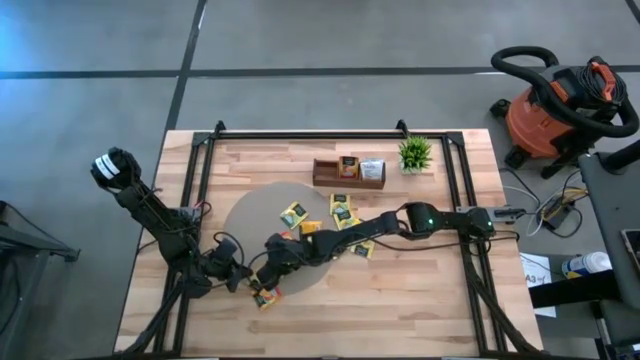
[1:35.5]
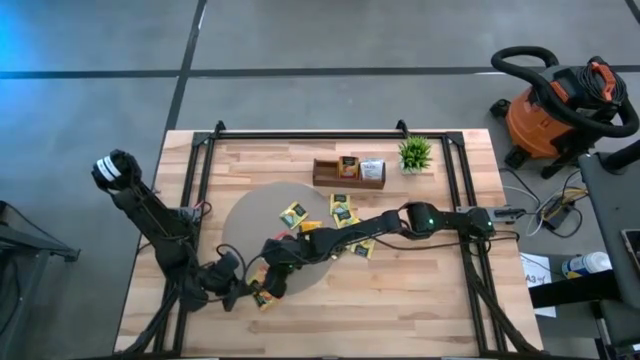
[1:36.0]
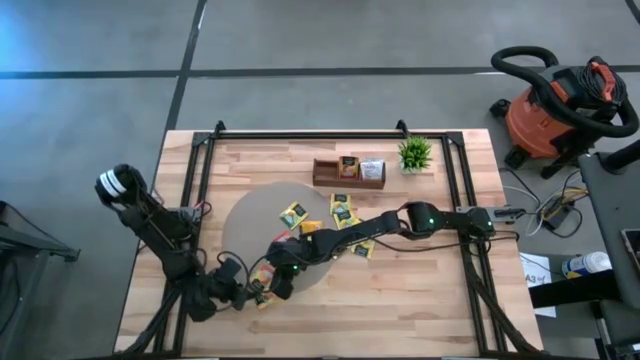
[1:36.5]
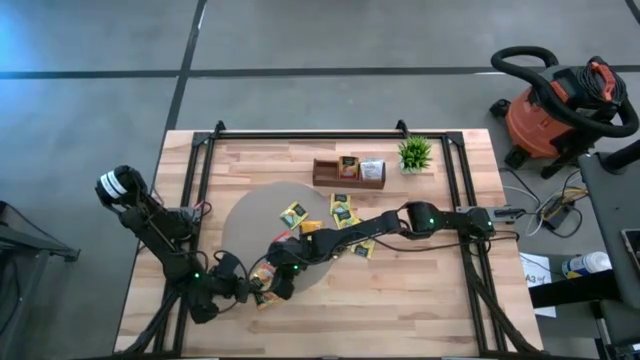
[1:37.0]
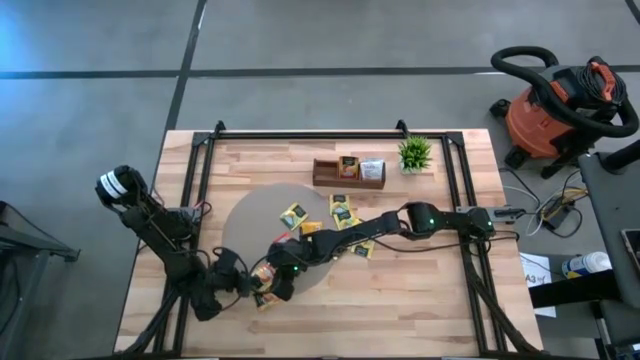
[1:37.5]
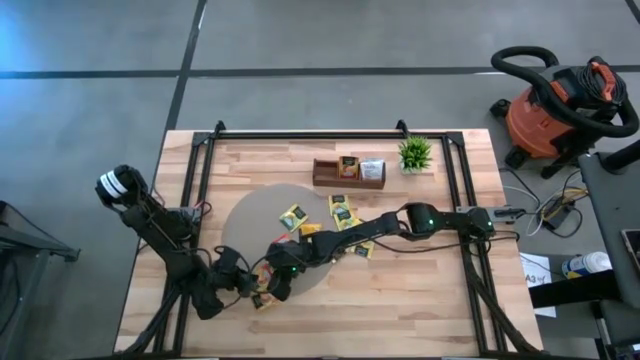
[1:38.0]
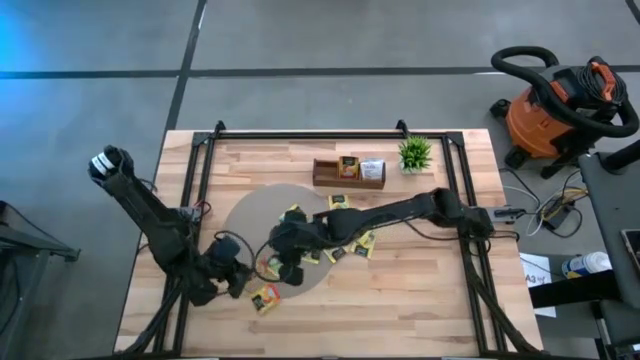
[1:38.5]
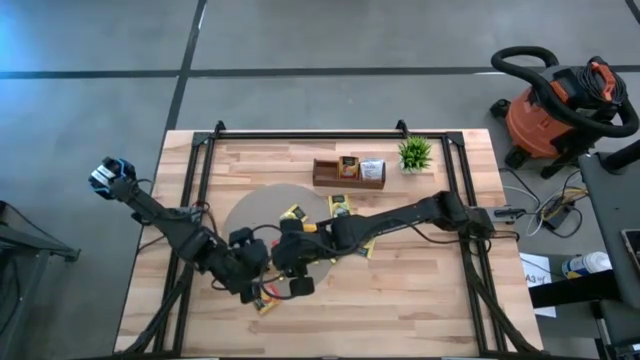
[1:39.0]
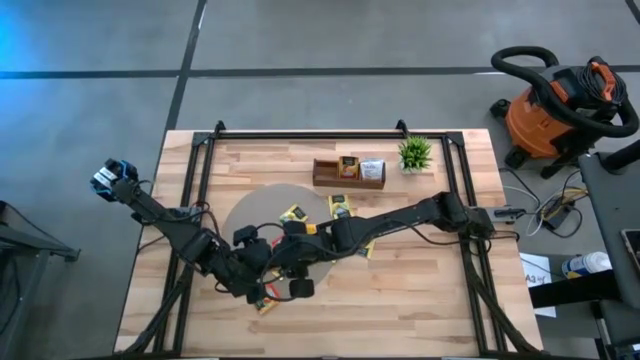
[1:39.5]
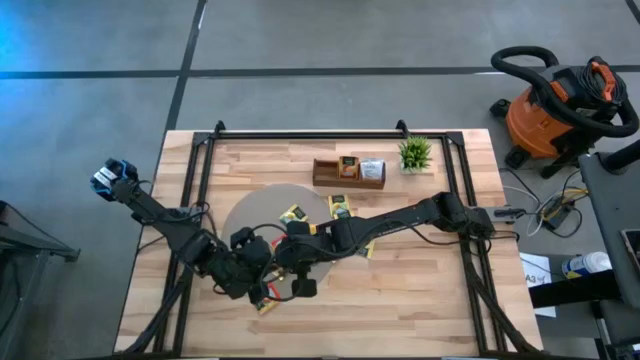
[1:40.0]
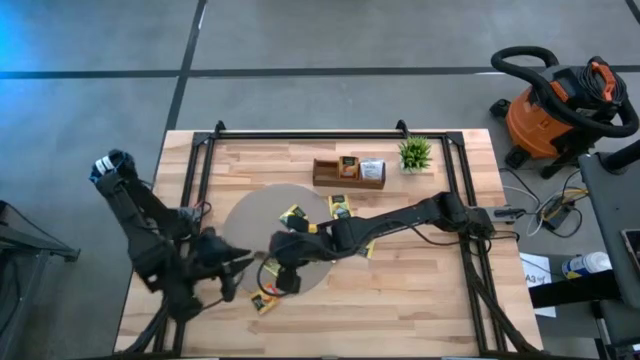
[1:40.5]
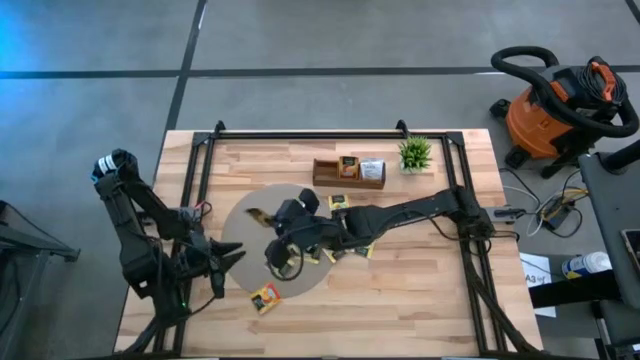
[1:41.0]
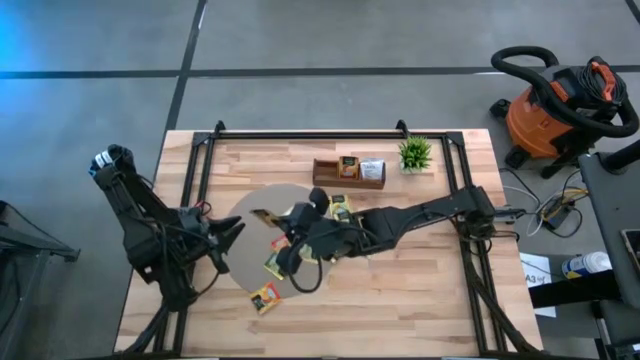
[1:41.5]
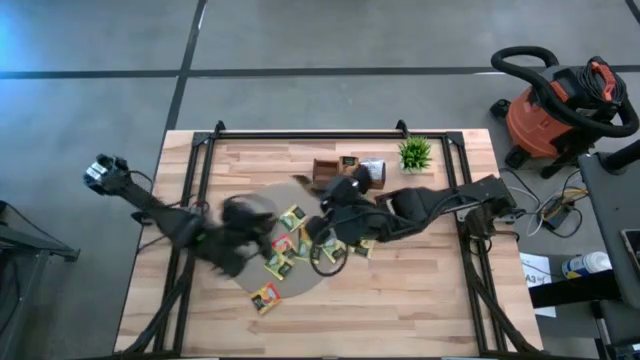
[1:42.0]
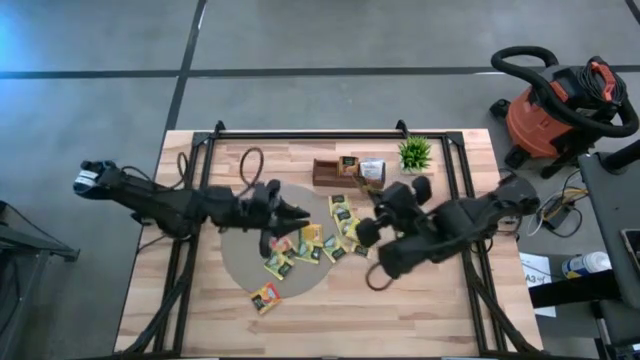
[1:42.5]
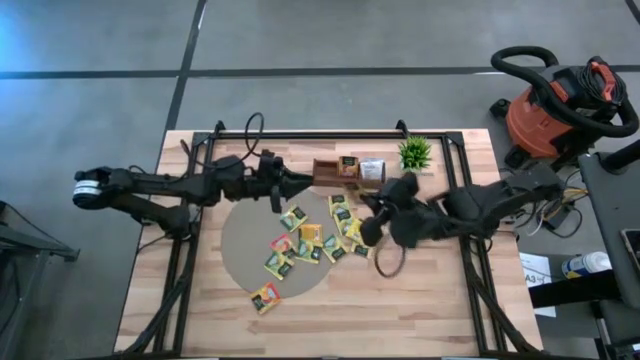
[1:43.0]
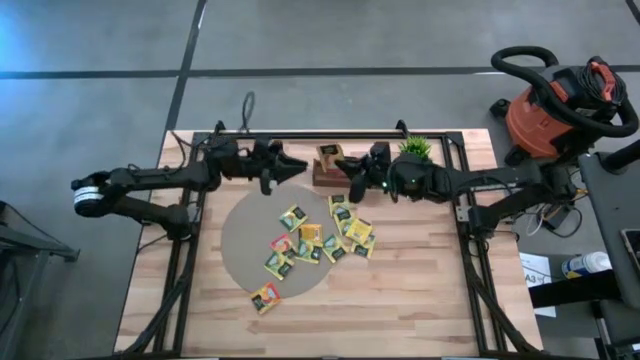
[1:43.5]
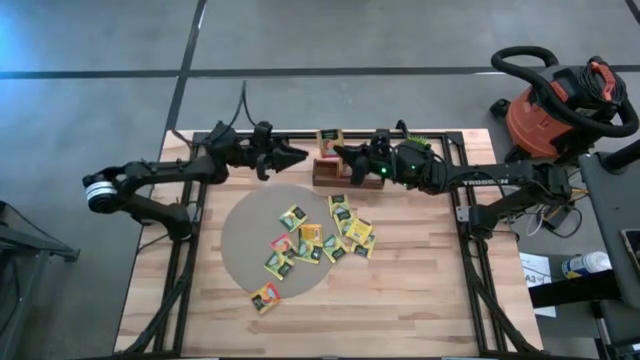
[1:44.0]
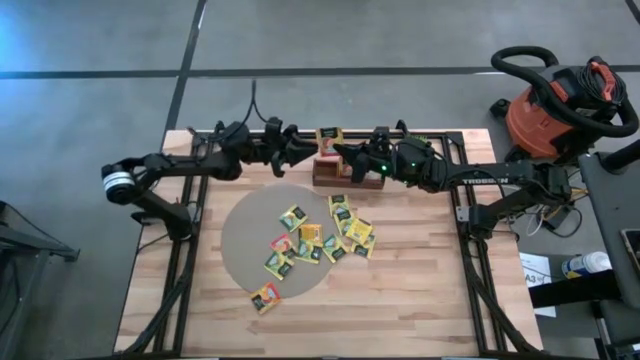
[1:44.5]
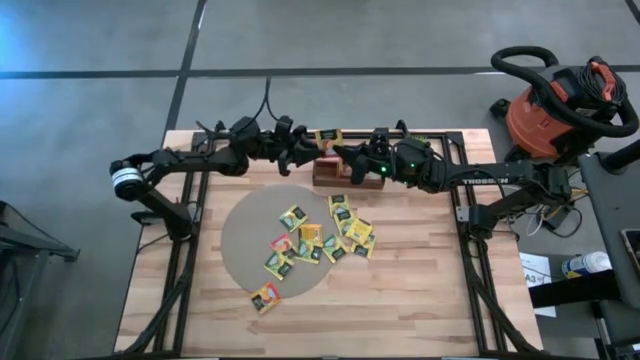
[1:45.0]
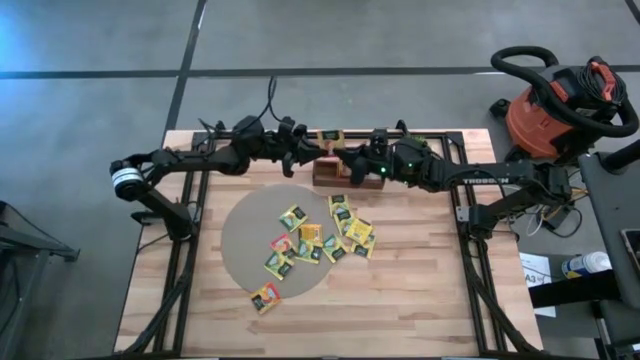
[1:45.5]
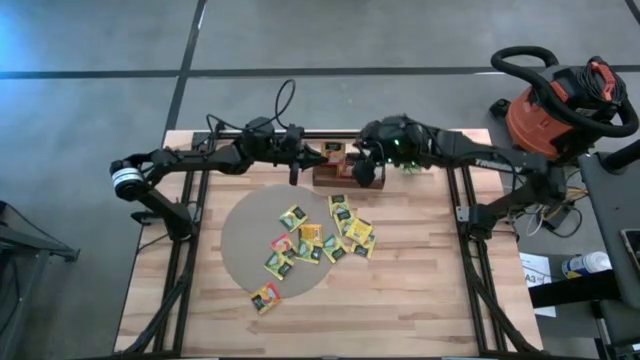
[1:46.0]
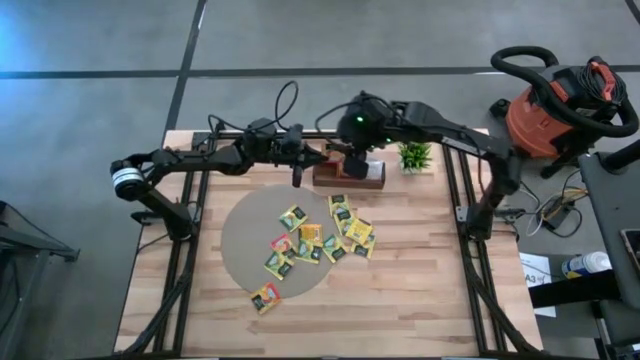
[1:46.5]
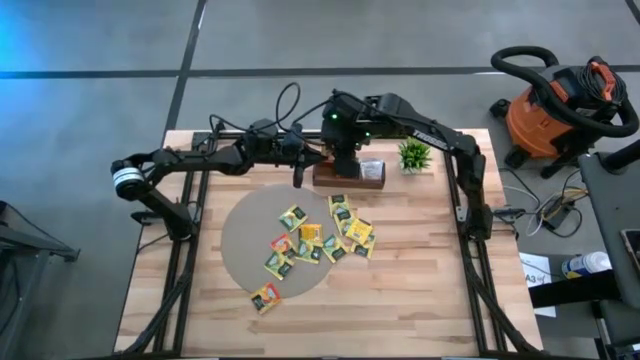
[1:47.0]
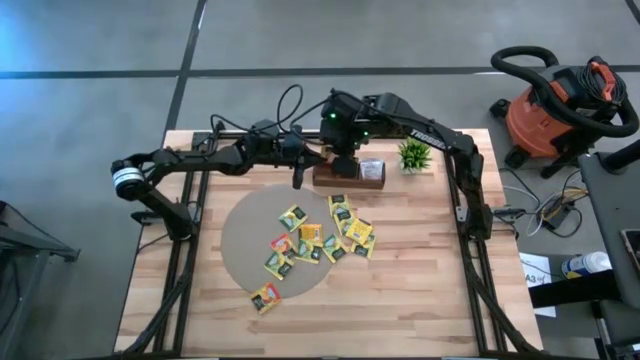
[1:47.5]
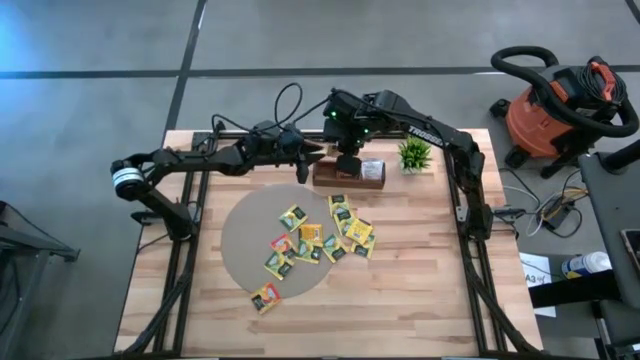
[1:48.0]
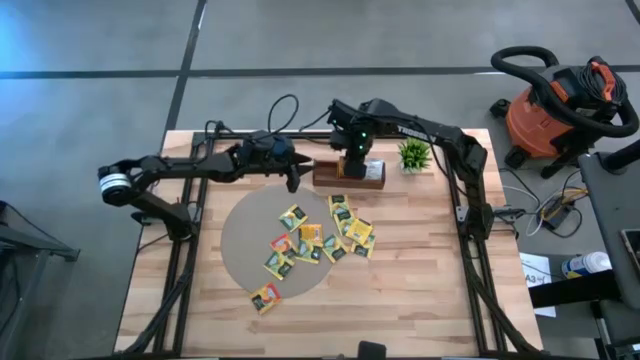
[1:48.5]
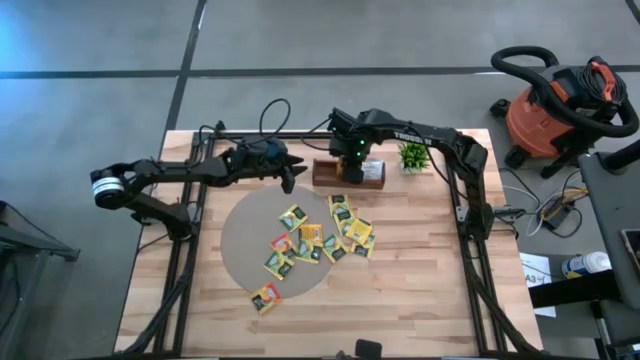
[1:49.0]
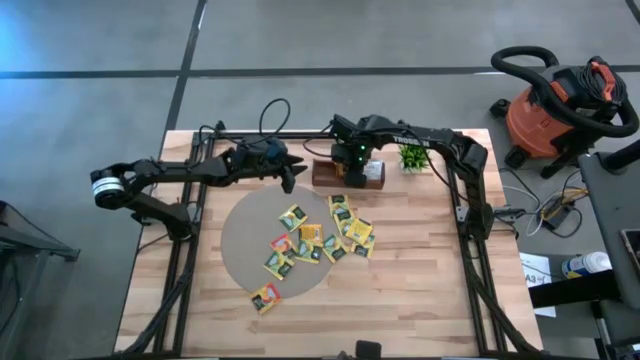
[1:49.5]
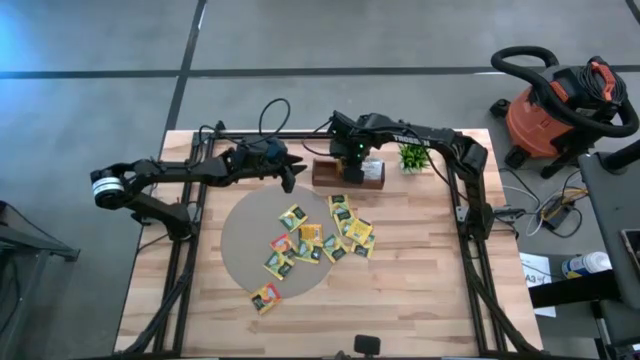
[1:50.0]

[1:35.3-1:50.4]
Task: Pick & Place Tea
Put the red tea sachet into the middle compartment of the wooden organizer

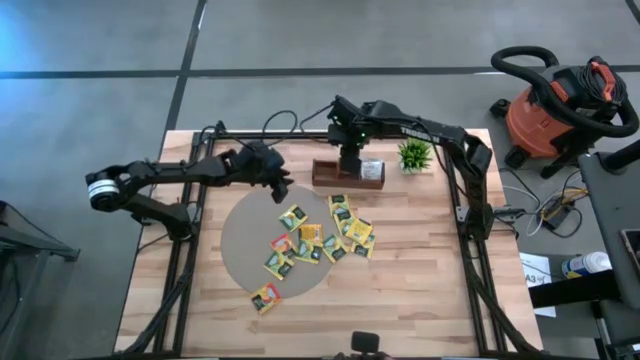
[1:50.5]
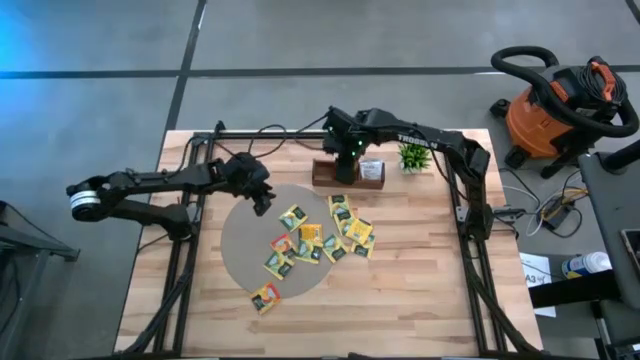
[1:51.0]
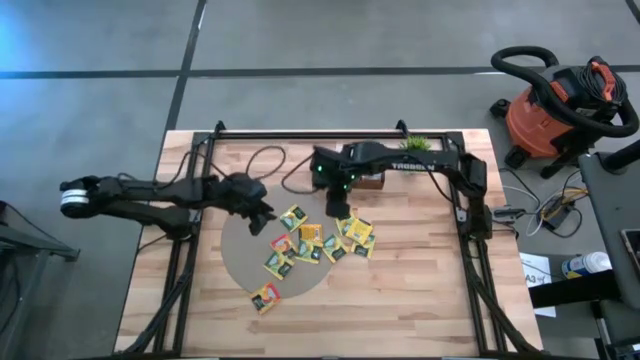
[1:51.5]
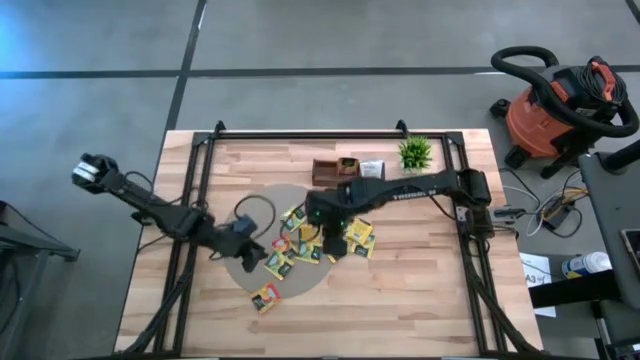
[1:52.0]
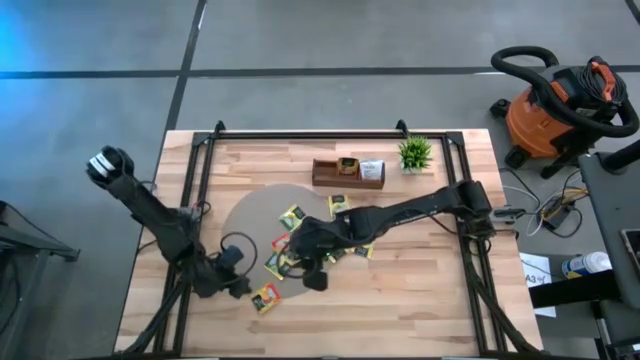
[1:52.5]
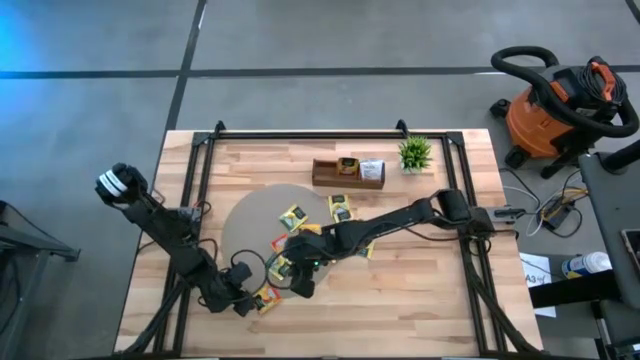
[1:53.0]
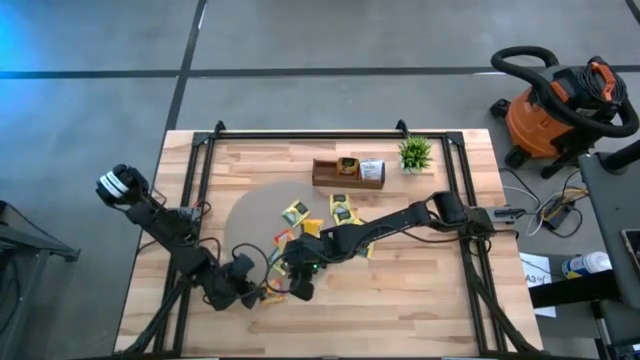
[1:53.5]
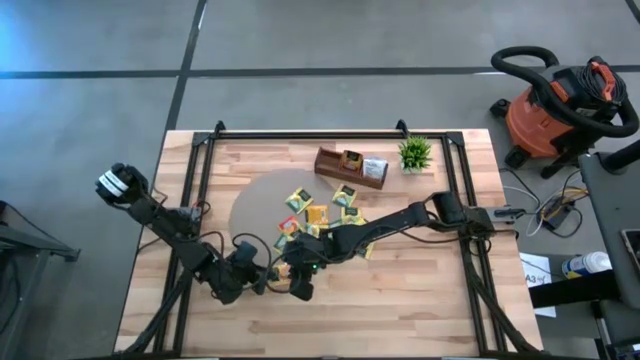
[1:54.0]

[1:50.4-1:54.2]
Put the red tea sachet into the middle compartment of the wooden organizer

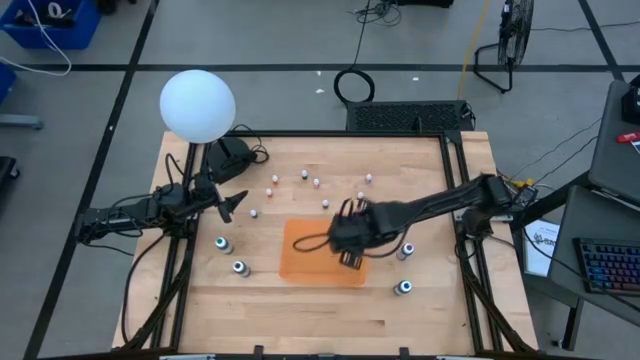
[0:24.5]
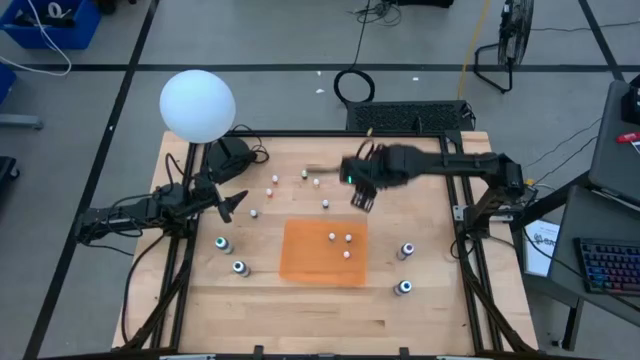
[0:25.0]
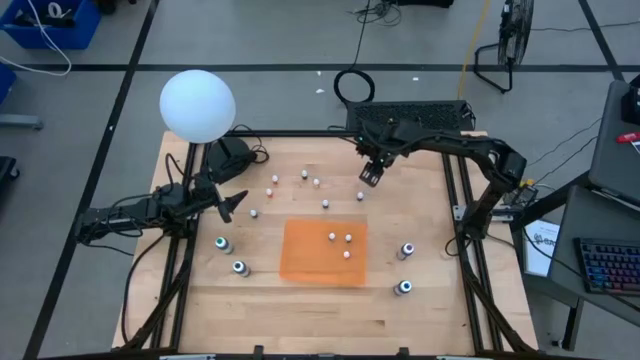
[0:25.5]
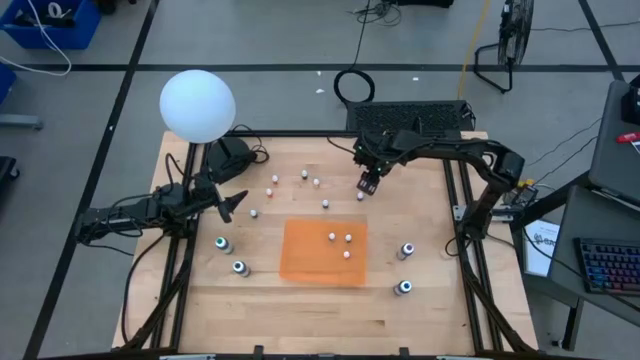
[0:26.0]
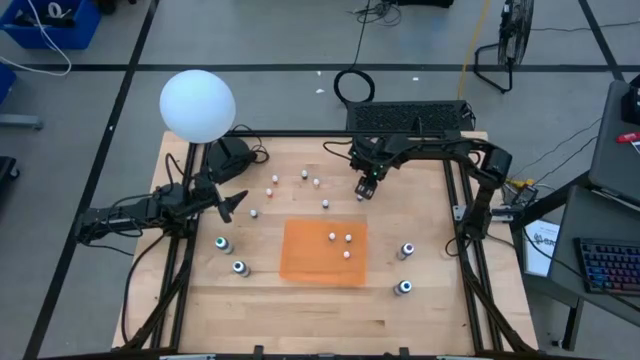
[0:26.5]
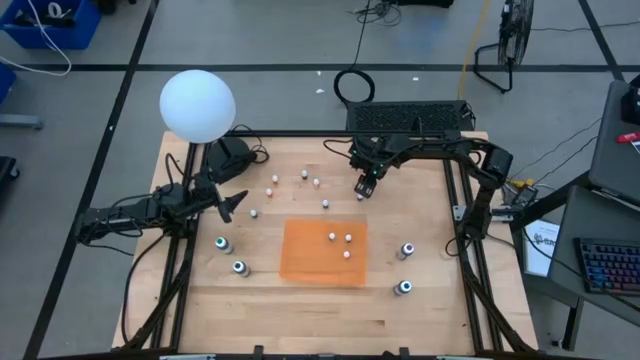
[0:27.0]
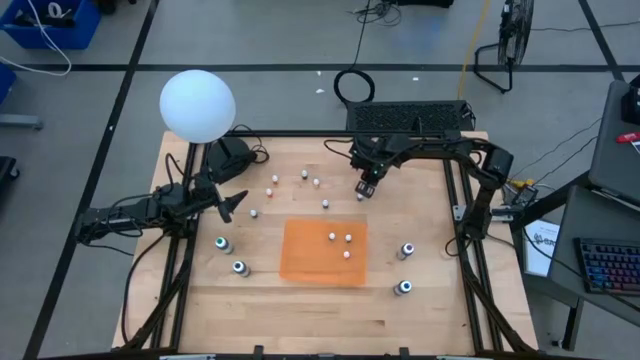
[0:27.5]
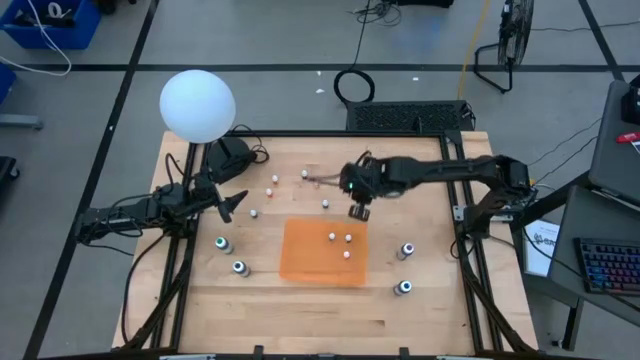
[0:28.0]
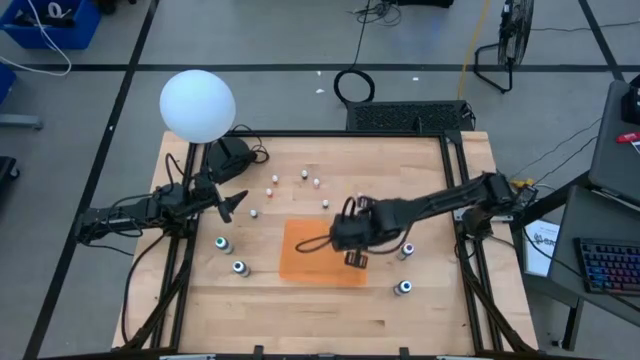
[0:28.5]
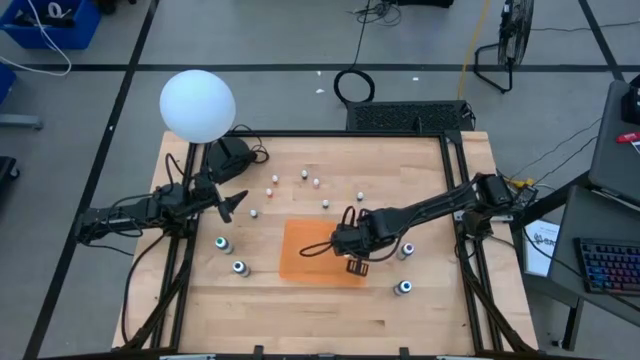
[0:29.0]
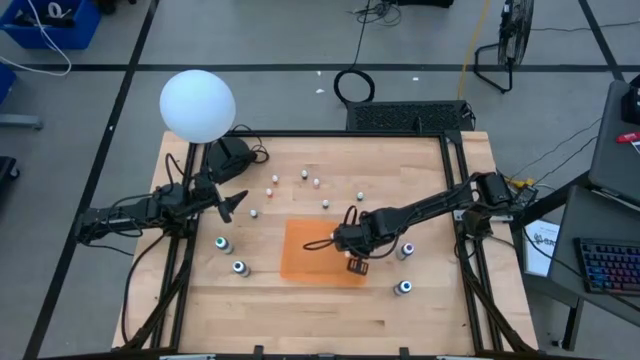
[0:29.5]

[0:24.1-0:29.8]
Task: Pick & Place food coloring
Put the red food coloring bottle into the orange bin
